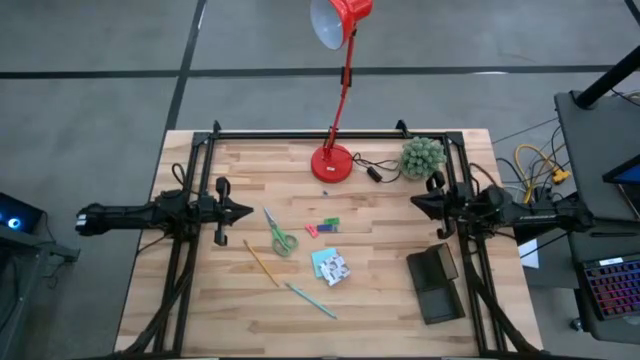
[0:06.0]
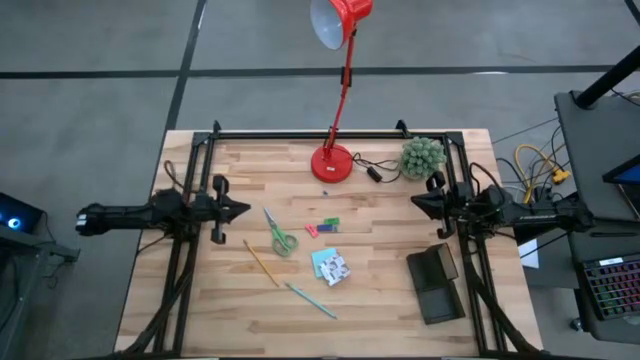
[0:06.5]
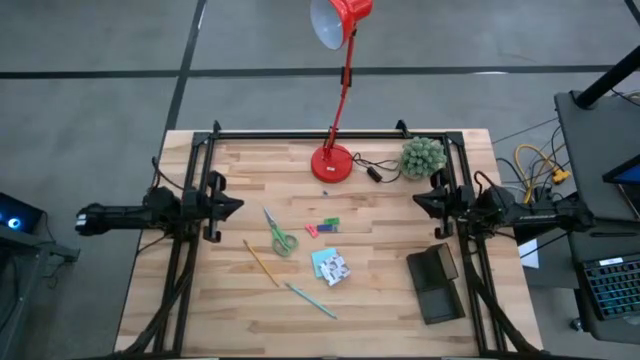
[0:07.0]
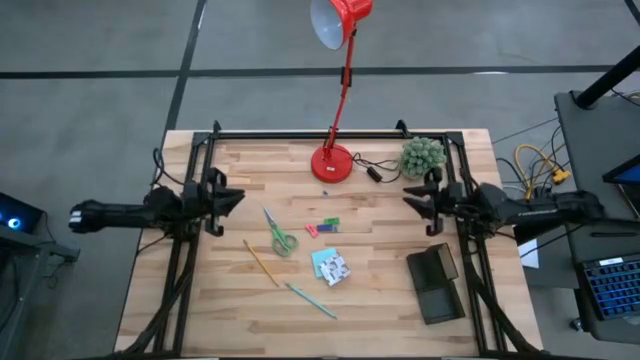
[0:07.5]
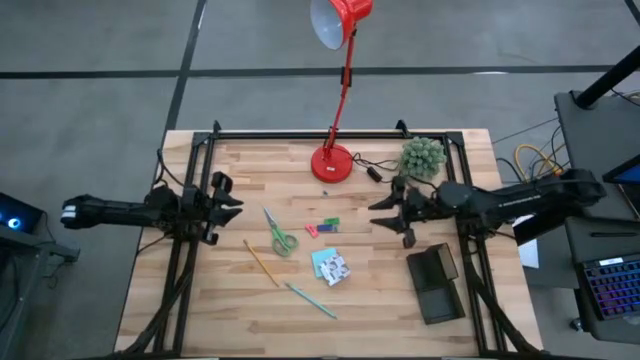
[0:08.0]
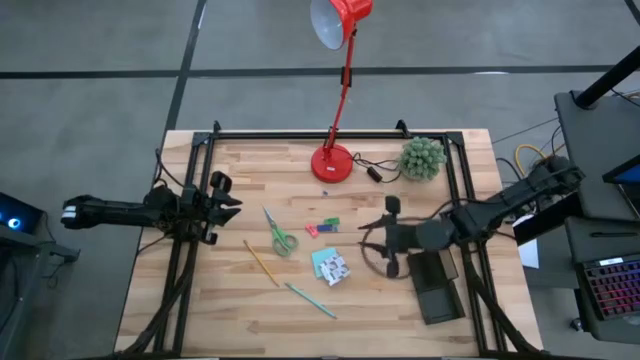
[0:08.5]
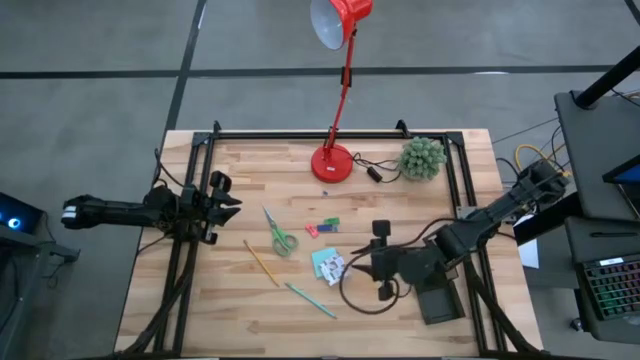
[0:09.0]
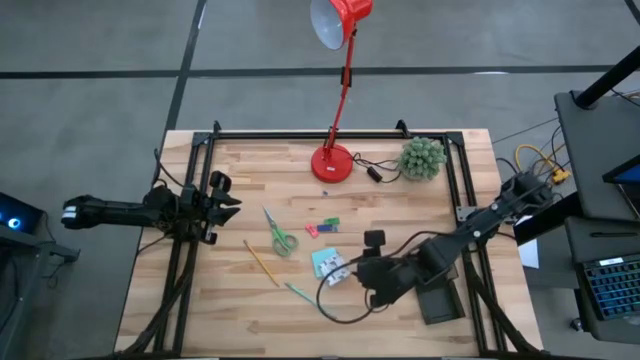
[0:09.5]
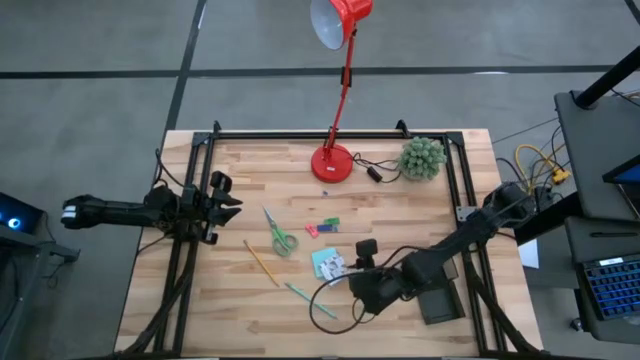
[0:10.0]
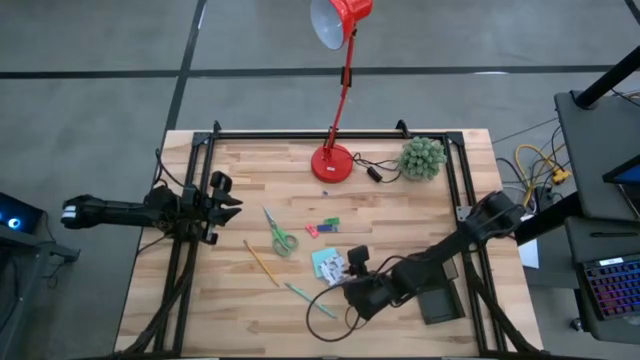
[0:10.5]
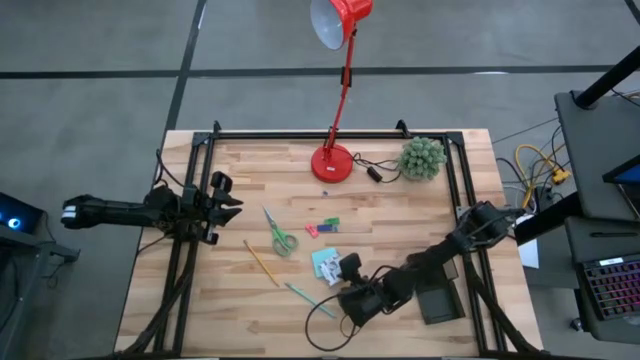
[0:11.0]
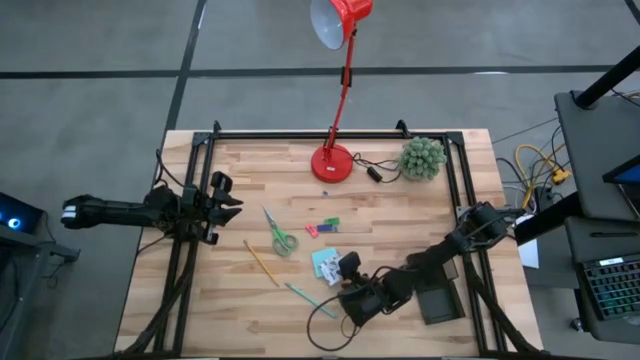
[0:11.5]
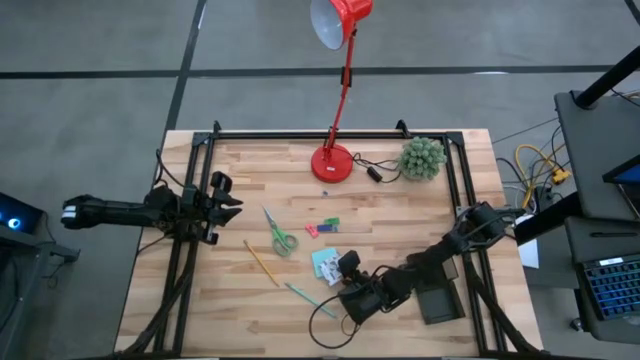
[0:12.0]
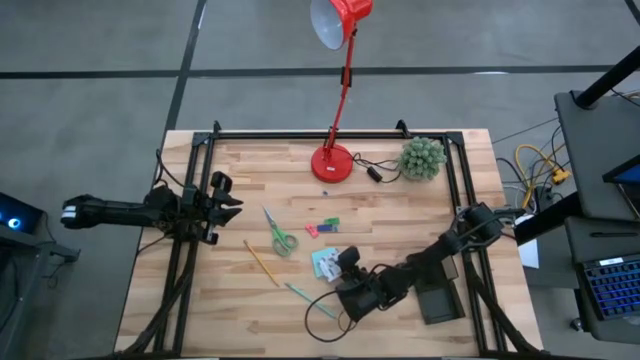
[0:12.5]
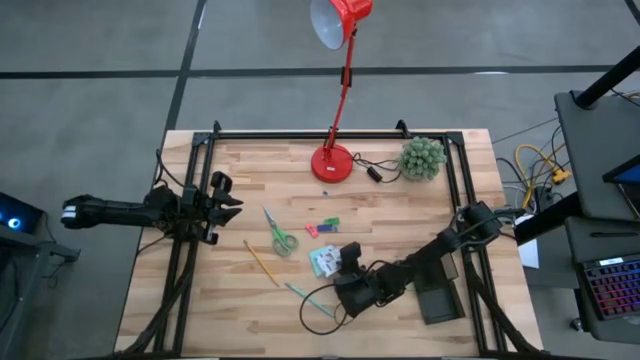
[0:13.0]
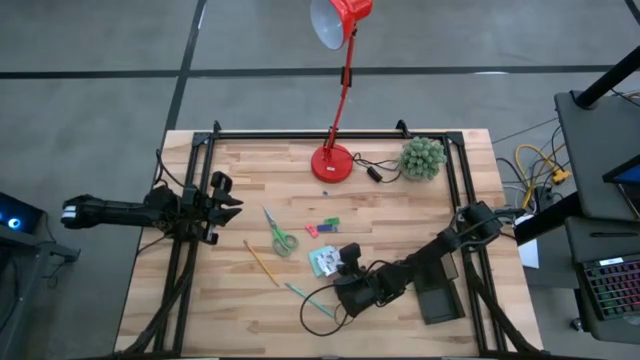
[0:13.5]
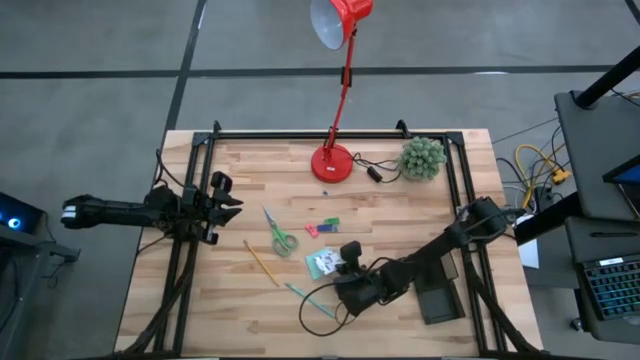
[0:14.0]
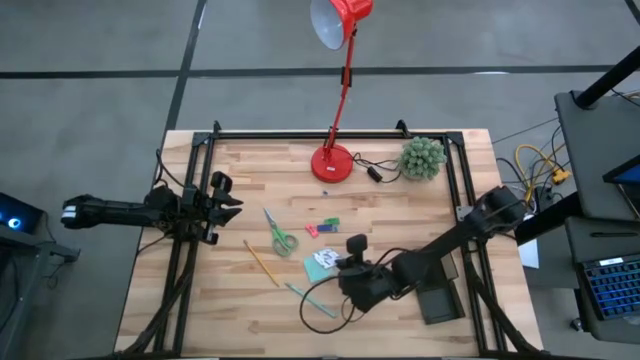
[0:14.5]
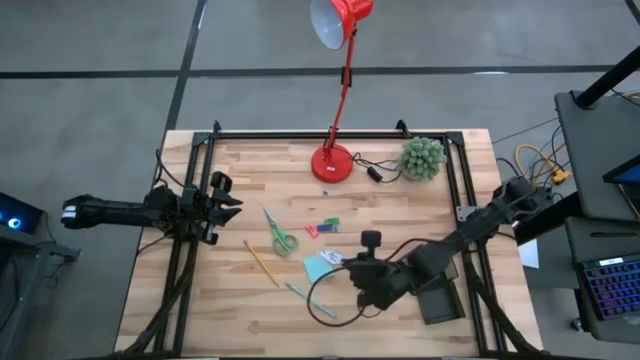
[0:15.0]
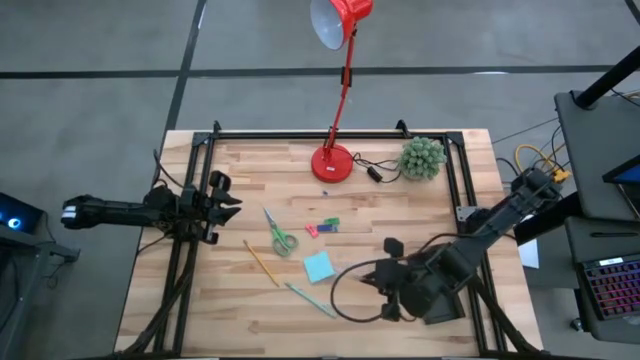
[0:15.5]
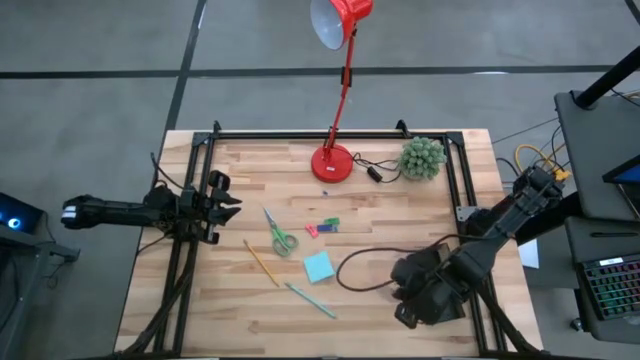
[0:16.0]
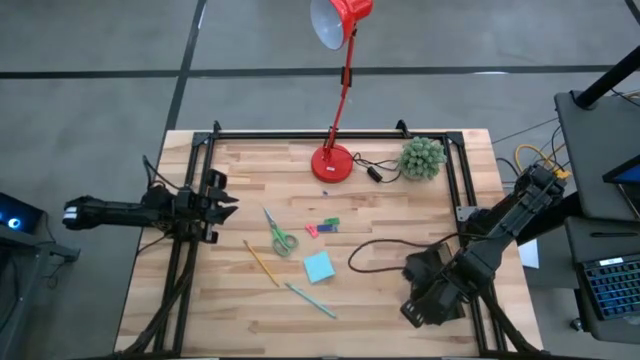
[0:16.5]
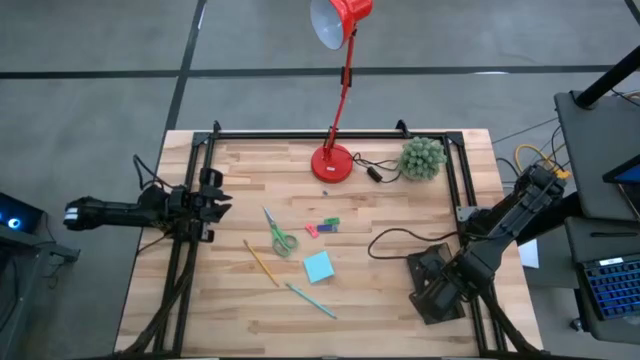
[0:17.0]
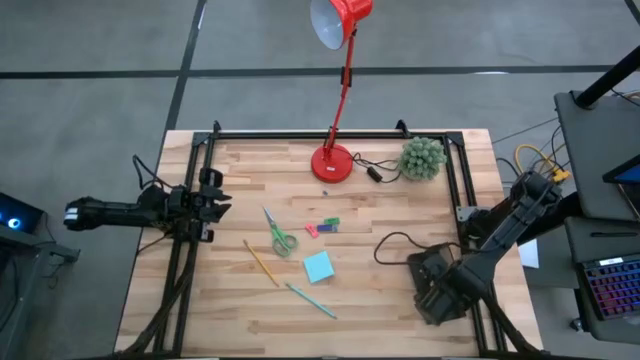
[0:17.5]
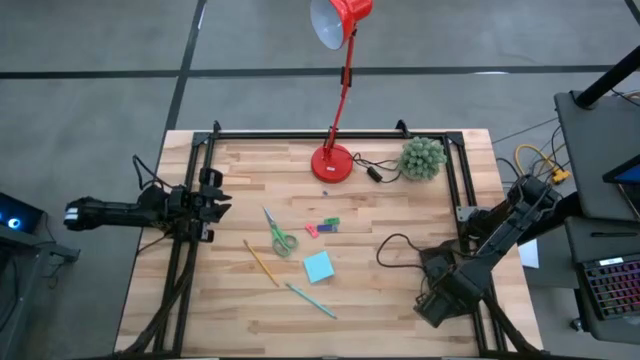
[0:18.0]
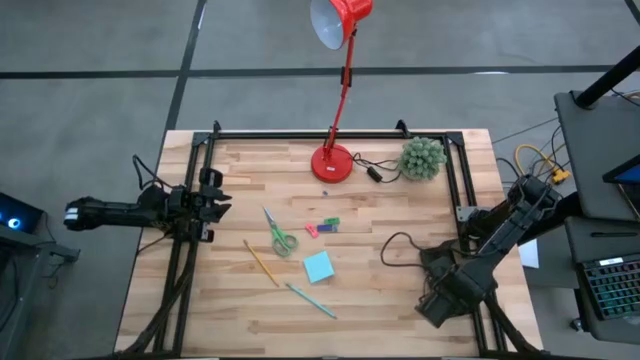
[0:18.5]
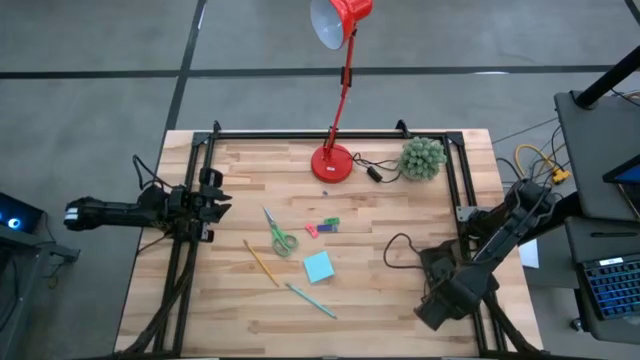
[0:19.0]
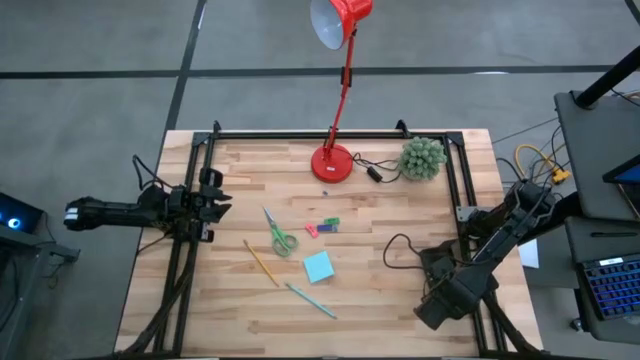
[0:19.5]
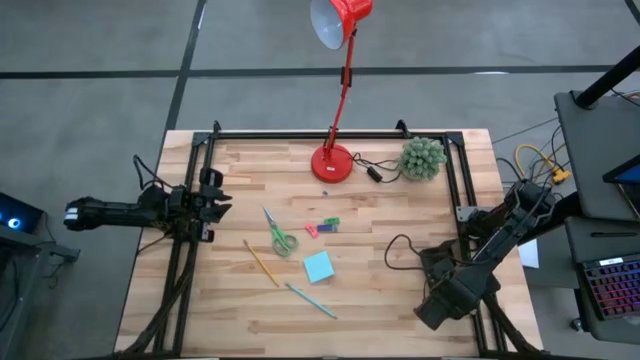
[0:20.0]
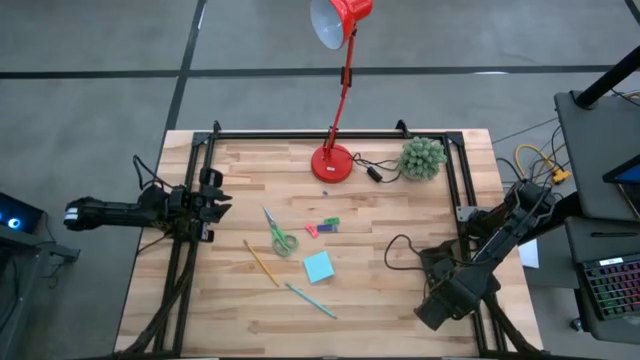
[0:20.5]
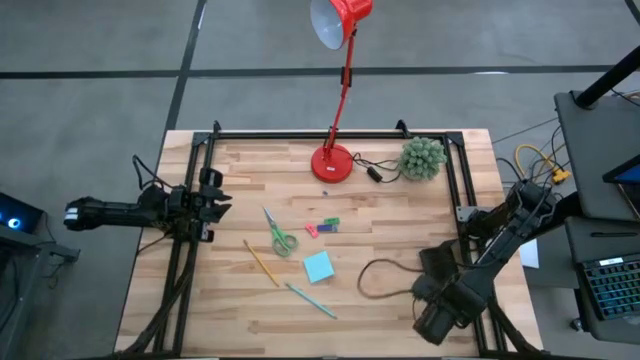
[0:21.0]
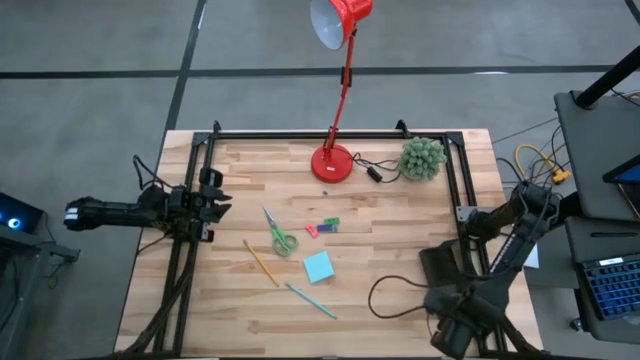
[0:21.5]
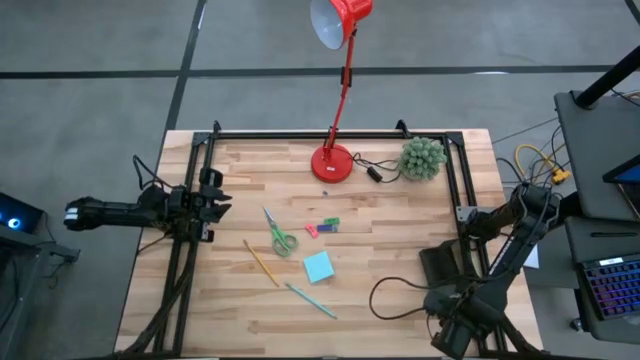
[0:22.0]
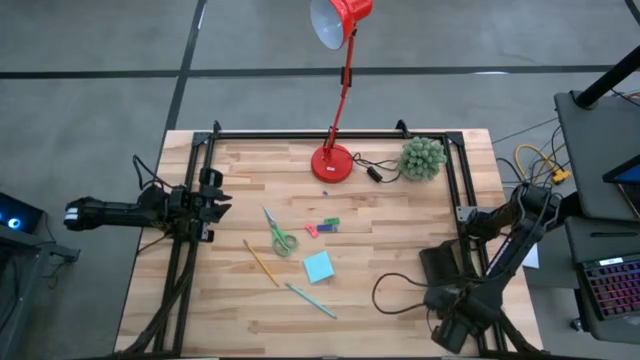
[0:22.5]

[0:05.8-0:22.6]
Task: Pick and place office supplies into organizer
Put the pink sticky note into the black desk organizer

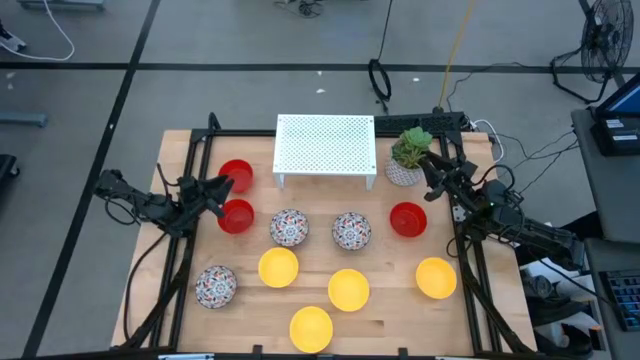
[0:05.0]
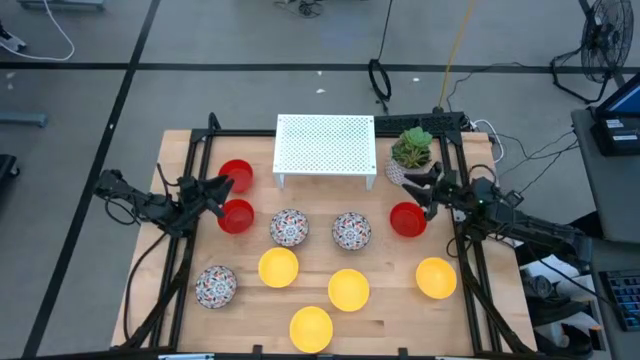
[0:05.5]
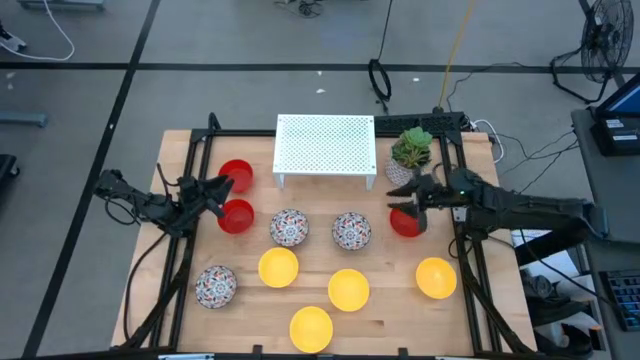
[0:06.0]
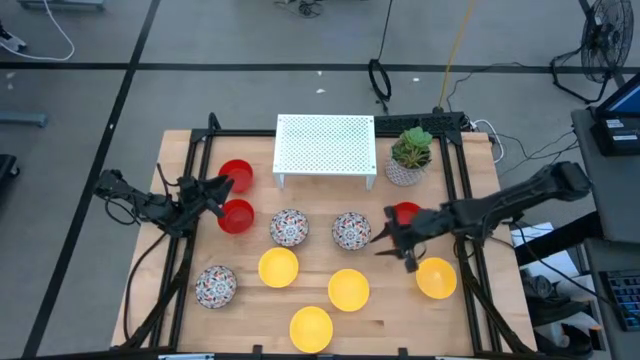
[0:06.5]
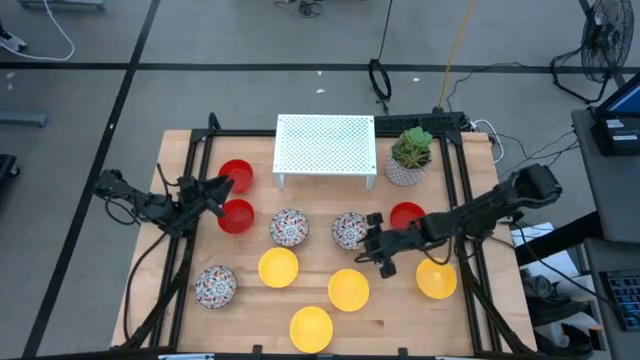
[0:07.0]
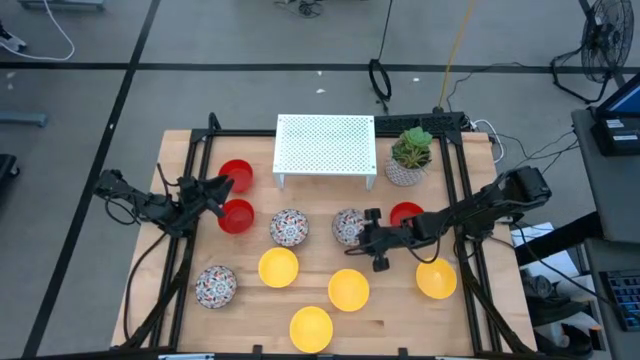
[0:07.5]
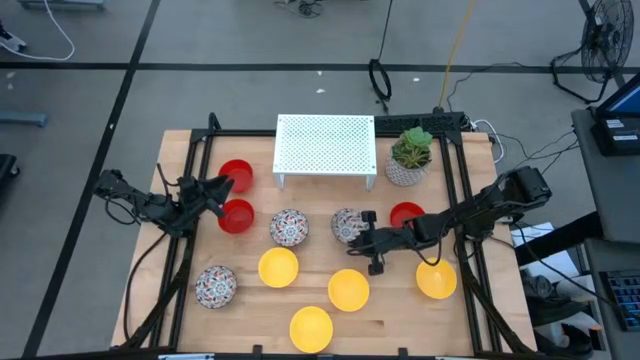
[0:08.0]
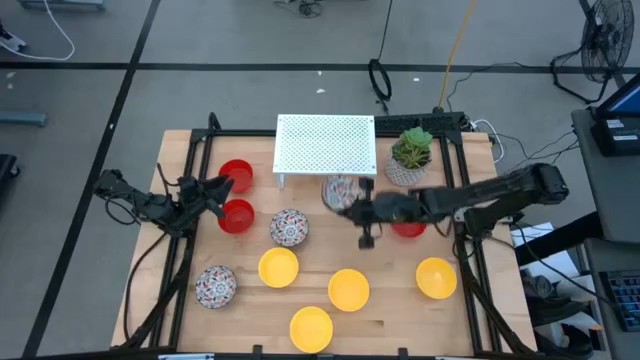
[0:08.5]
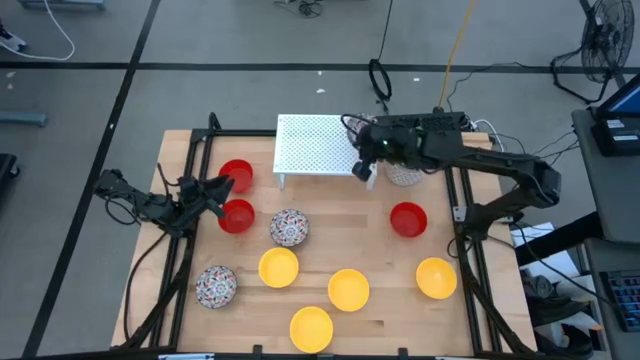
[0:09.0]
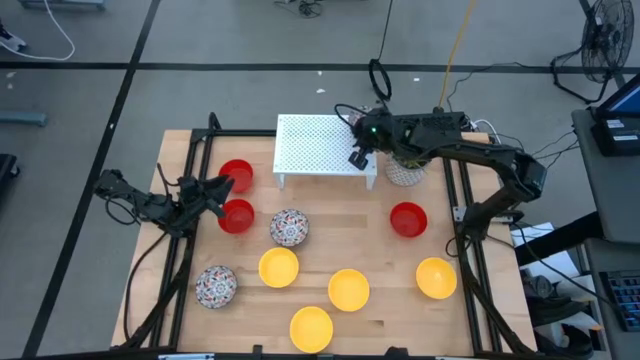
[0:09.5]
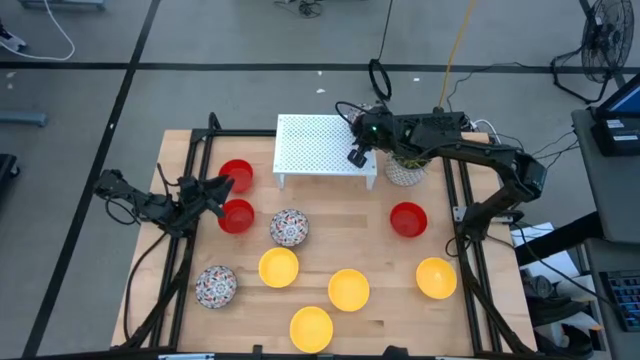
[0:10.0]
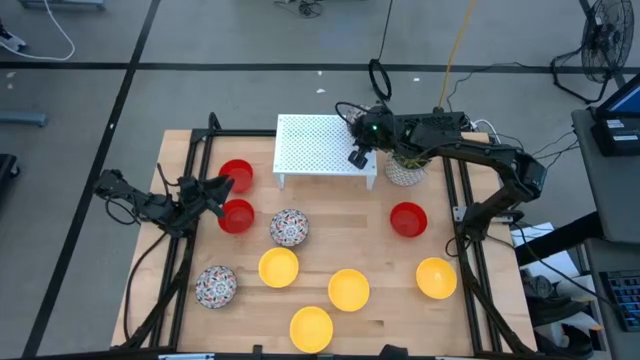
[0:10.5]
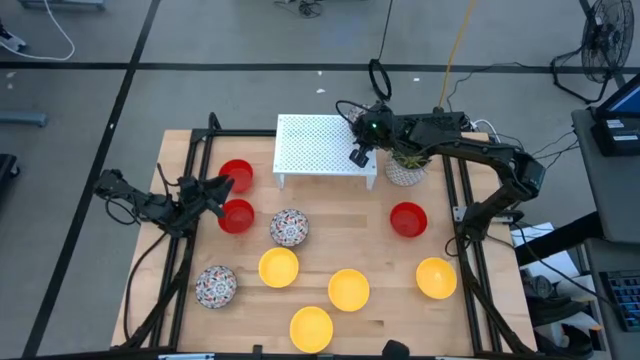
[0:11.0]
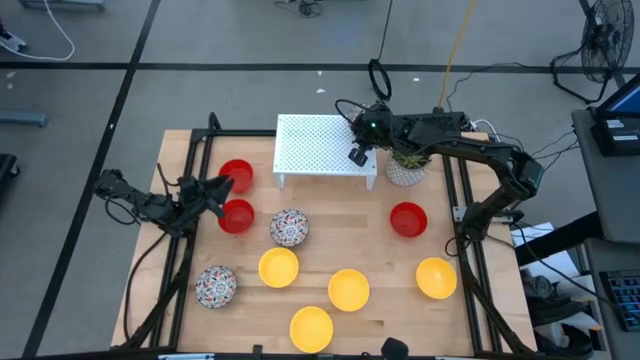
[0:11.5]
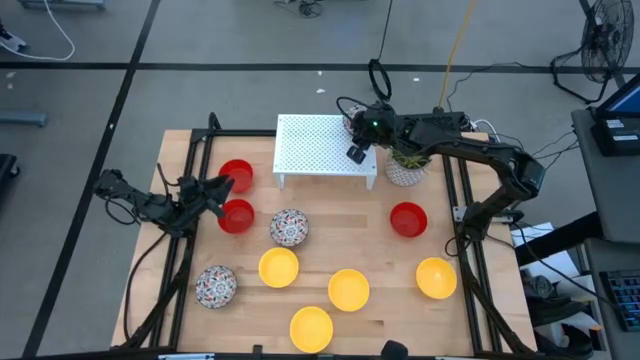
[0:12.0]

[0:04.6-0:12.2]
Task: Pick & Place Mini bowls
Put the white patterned bowl on the shelf
